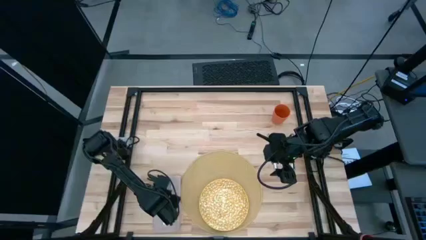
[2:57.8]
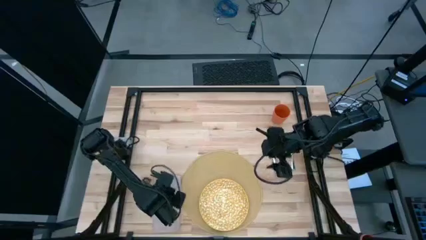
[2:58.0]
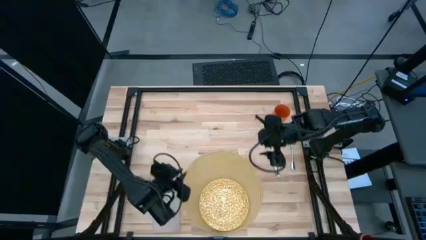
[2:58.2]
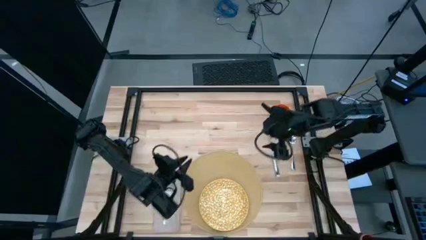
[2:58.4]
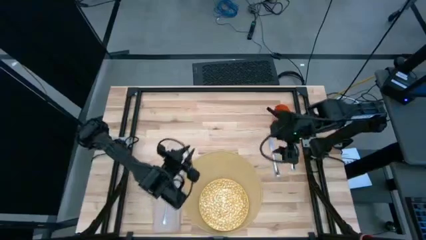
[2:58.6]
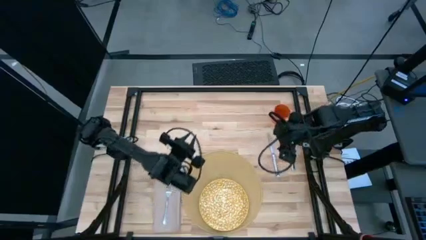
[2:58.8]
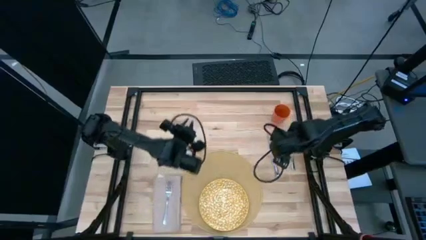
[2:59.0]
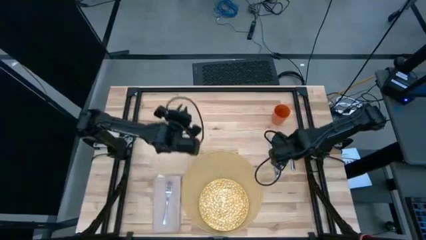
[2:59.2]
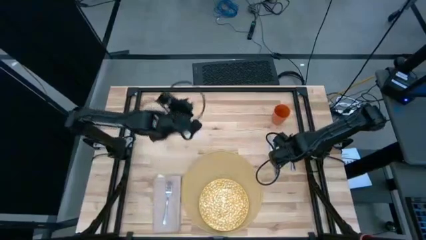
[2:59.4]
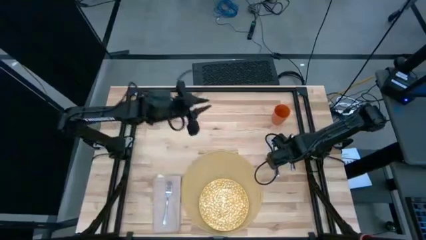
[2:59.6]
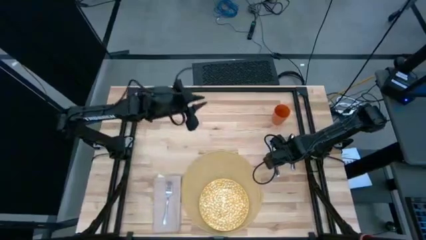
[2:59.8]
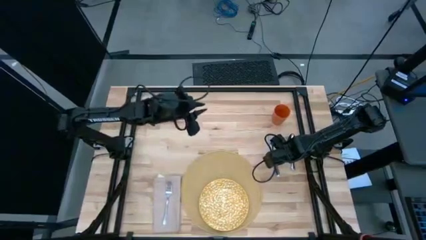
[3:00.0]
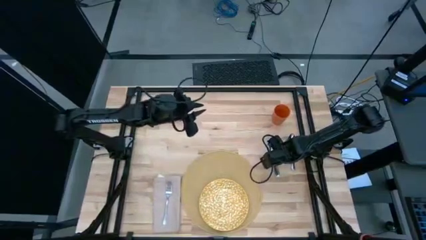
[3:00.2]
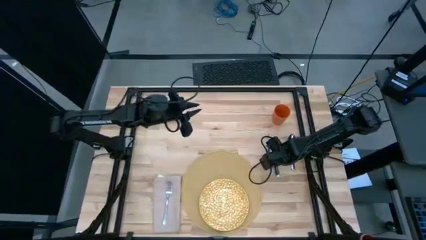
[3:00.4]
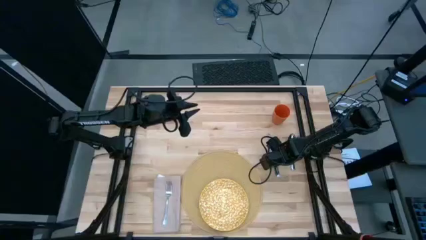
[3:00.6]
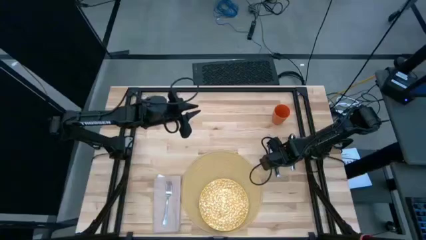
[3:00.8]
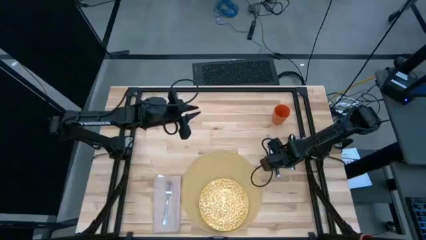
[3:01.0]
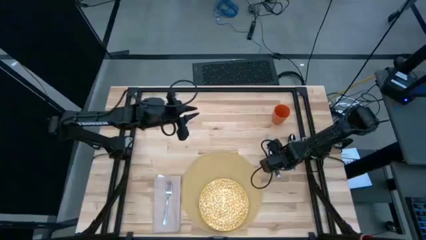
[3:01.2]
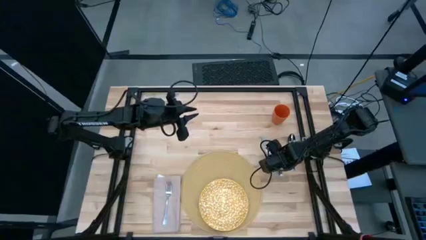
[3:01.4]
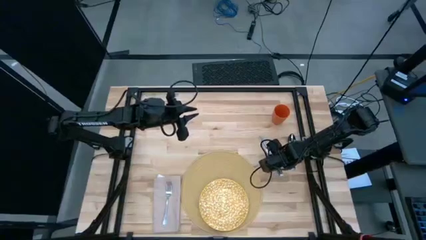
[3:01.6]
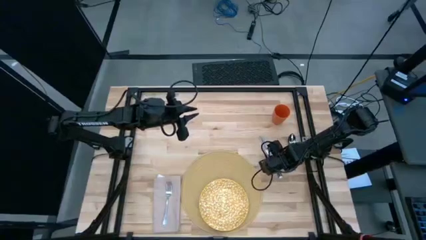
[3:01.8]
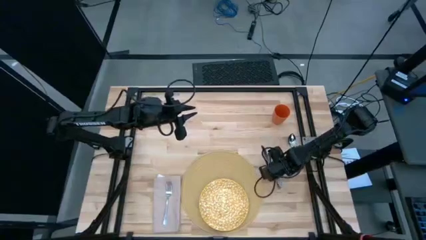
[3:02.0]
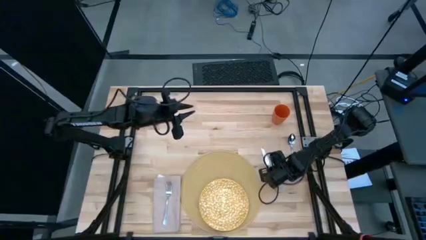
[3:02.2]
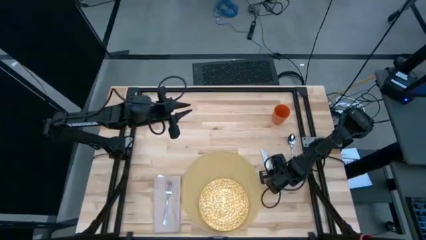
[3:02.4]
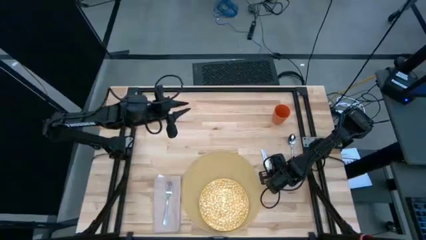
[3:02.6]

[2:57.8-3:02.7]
Task: Set table place
Put the table knife to the right of the brown table mat

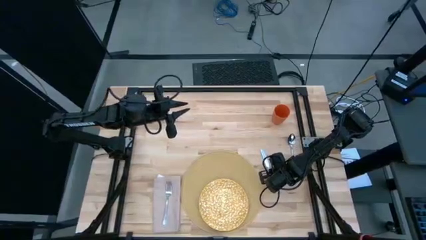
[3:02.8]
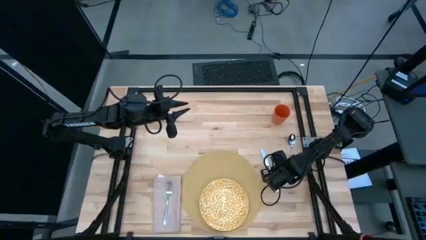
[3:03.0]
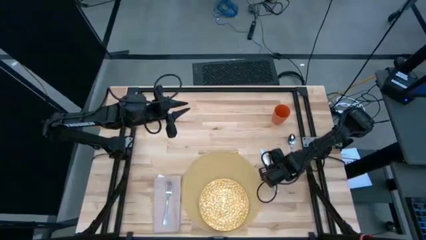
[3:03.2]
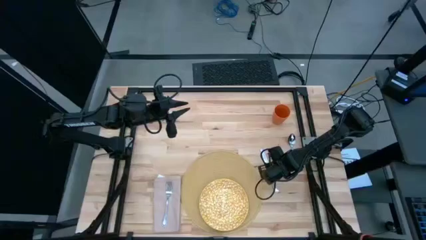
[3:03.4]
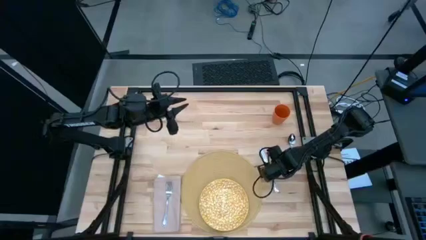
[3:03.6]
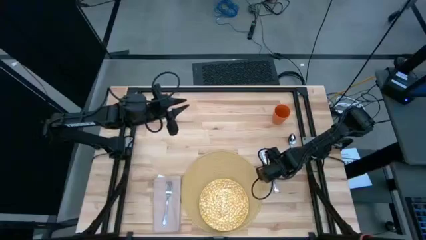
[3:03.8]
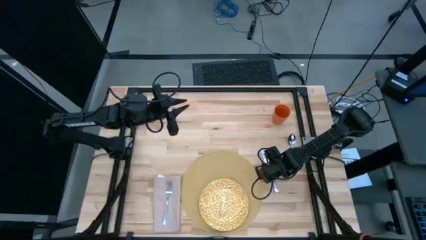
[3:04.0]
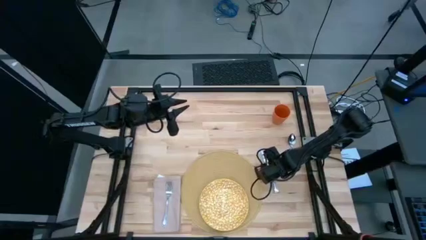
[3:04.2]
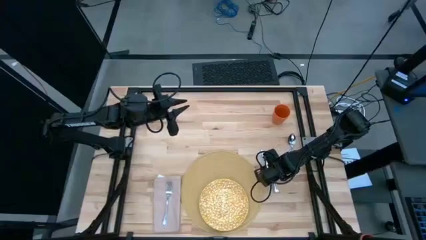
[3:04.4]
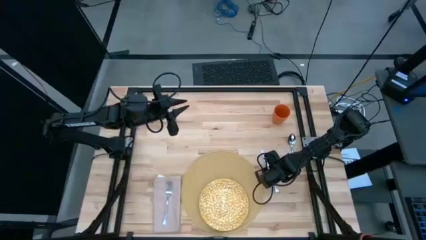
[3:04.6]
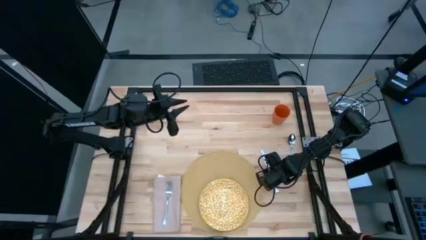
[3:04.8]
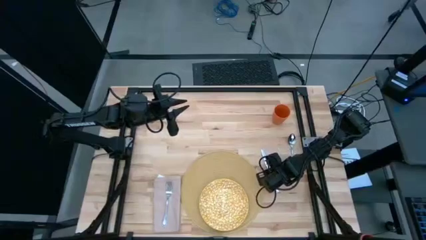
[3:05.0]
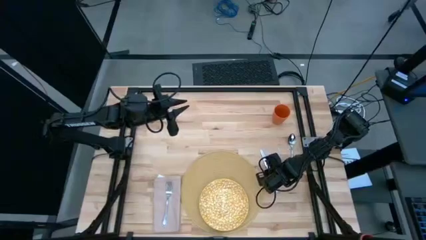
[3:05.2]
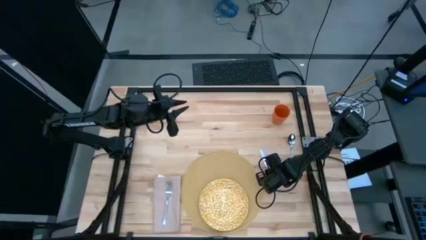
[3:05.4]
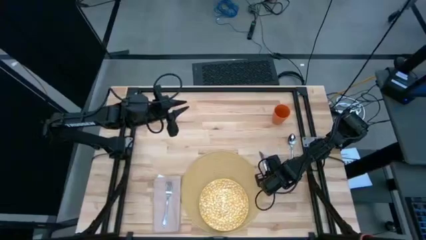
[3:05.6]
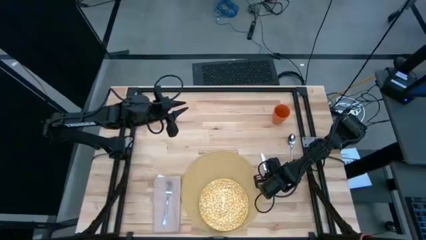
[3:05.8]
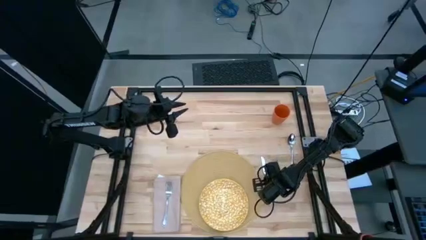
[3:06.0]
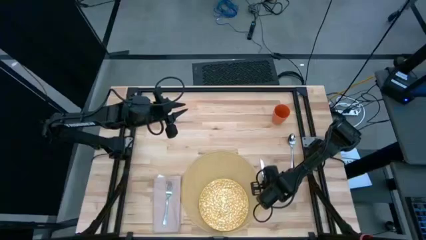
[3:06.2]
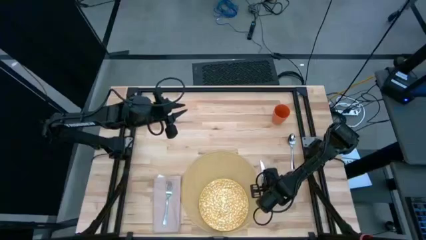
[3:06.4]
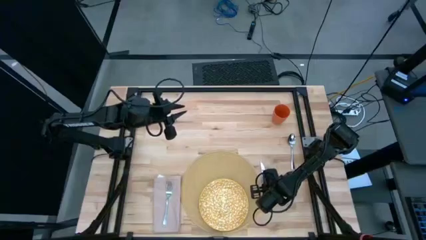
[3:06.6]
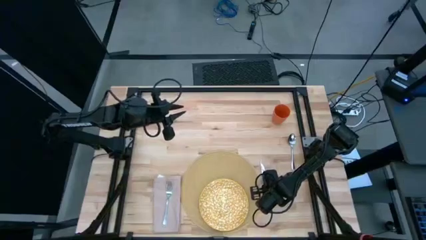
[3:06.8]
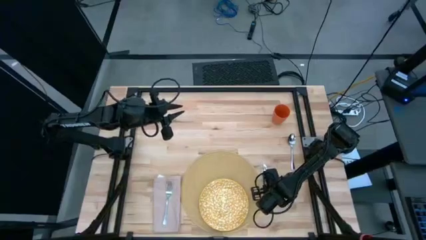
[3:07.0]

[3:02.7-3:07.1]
Put the table knife to the right of the brown table mat

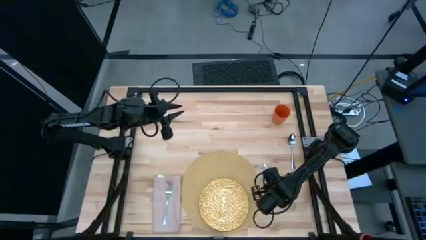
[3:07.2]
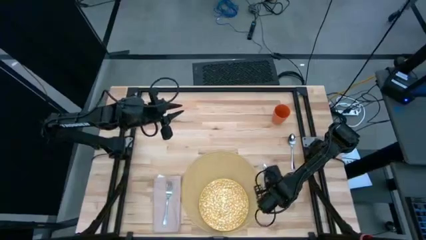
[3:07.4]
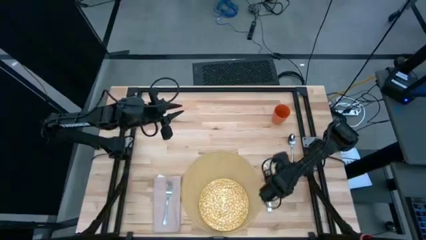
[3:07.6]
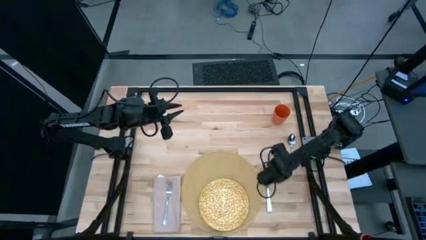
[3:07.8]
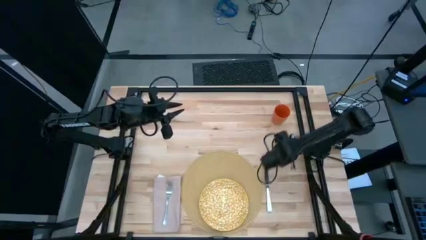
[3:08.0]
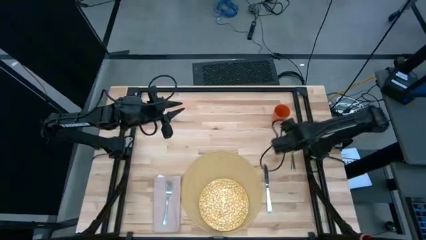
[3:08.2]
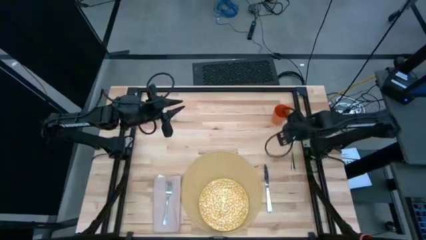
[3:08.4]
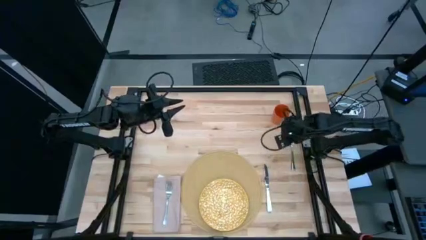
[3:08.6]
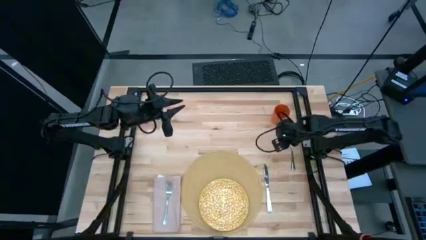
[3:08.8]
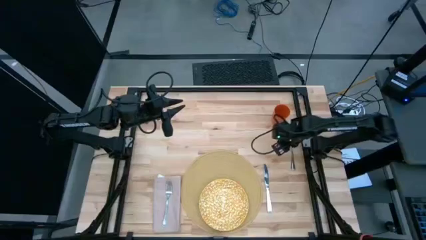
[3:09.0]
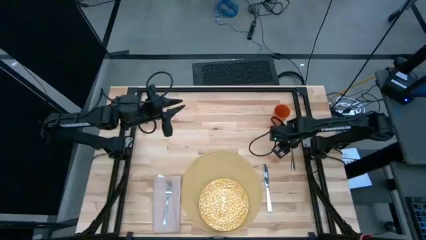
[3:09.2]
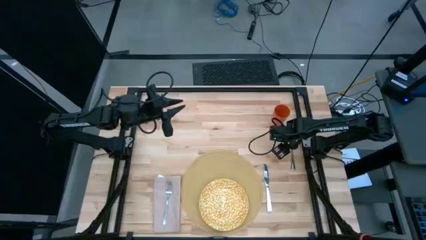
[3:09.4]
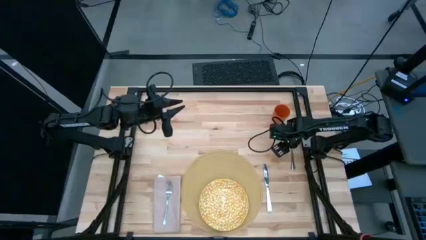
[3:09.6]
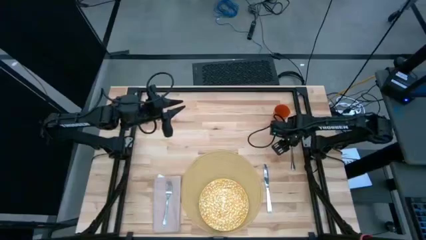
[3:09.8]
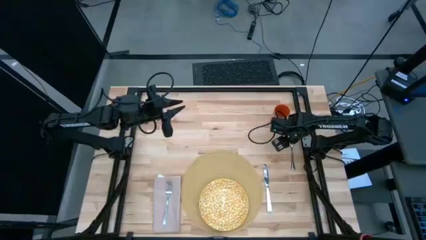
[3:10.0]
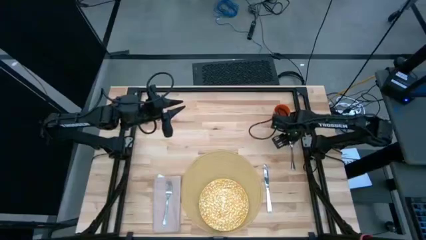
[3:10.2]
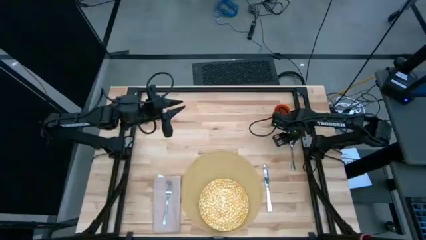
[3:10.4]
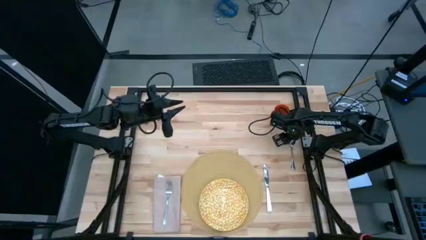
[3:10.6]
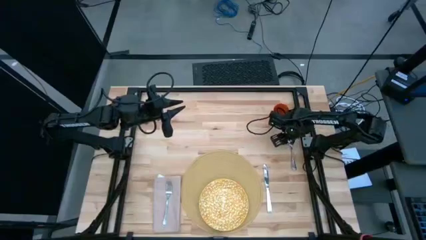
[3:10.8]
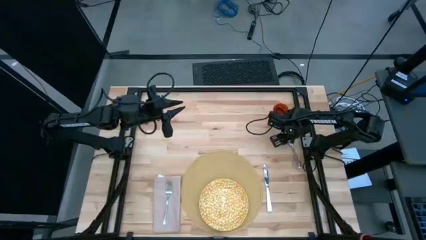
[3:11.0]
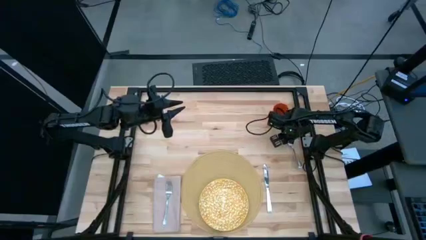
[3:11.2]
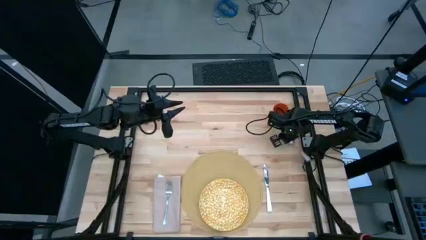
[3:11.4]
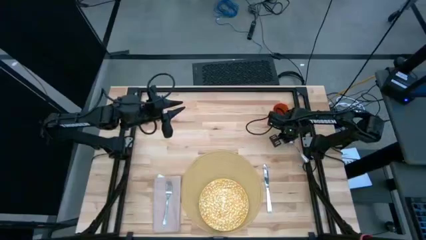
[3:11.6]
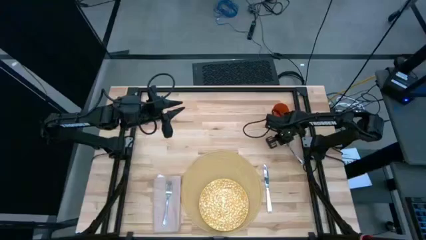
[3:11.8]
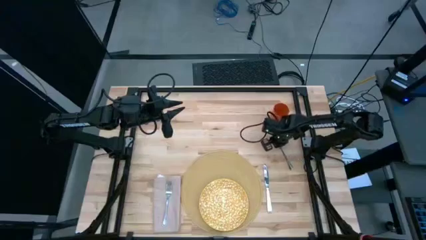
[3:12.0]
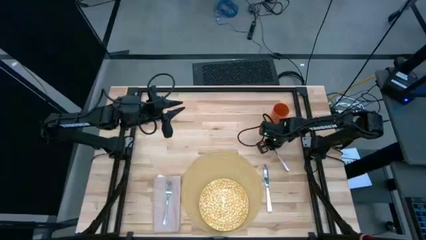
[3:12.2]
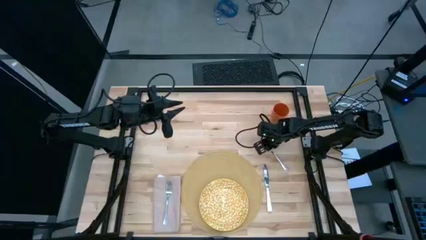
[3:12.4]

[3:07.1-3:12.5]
Put the spoon on the right of the table knife

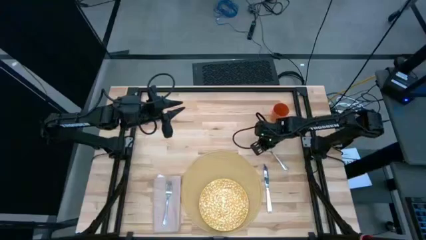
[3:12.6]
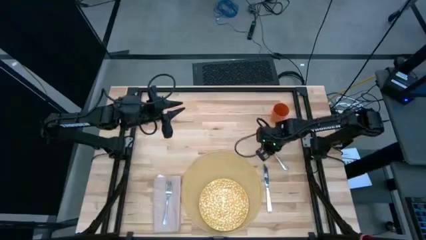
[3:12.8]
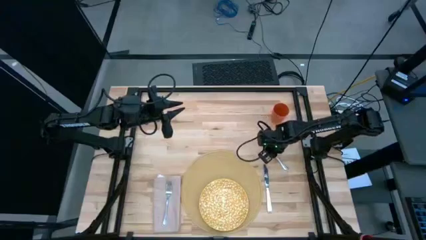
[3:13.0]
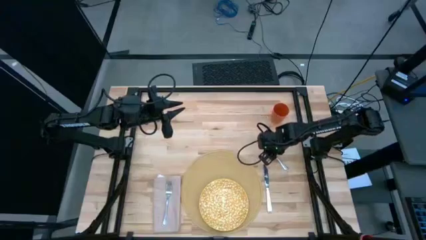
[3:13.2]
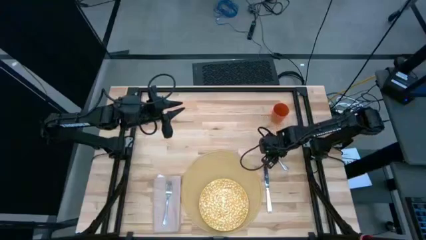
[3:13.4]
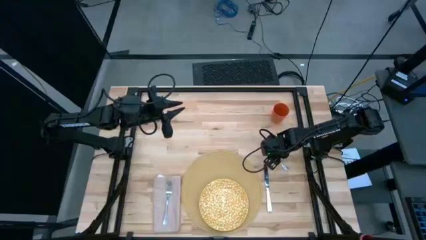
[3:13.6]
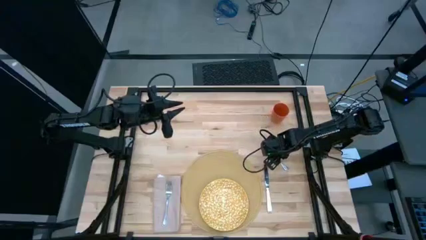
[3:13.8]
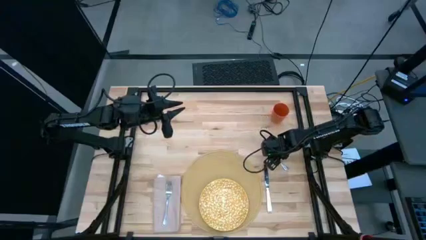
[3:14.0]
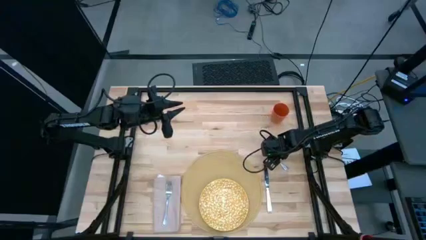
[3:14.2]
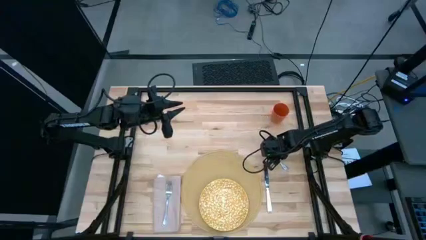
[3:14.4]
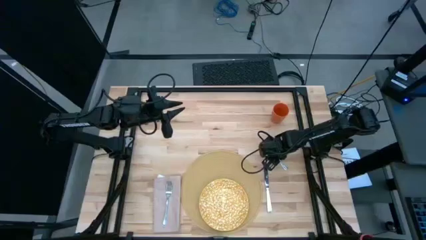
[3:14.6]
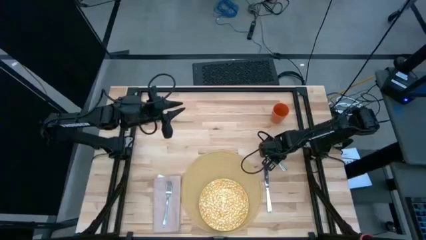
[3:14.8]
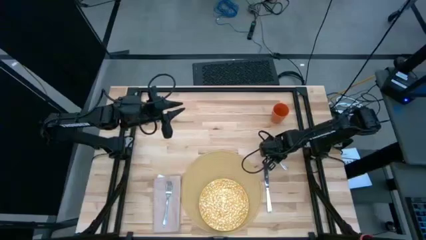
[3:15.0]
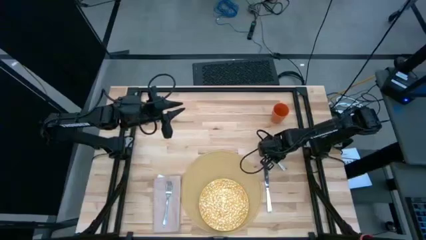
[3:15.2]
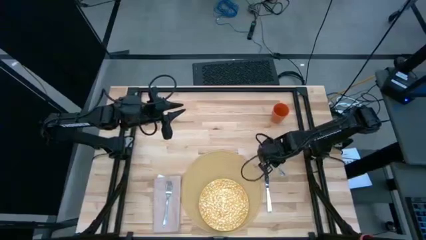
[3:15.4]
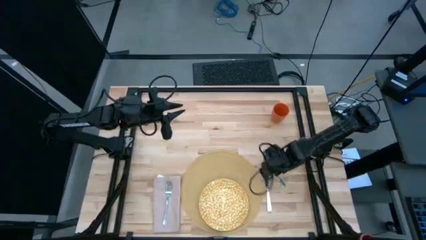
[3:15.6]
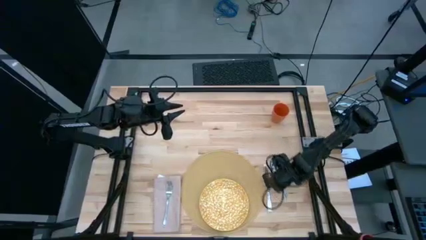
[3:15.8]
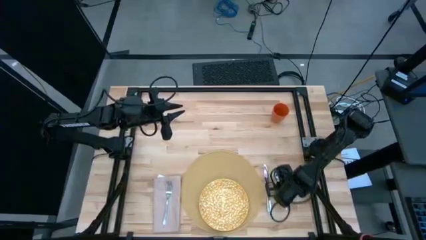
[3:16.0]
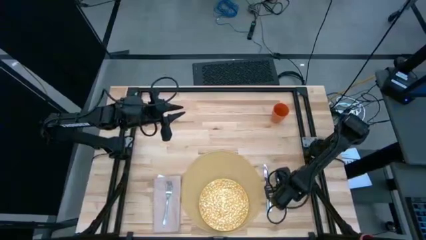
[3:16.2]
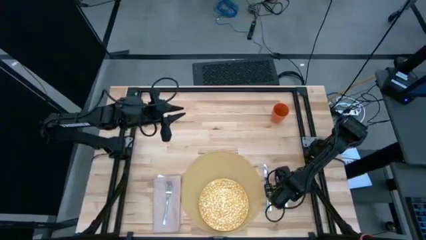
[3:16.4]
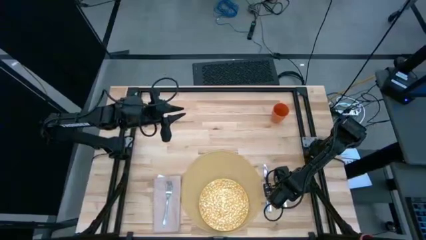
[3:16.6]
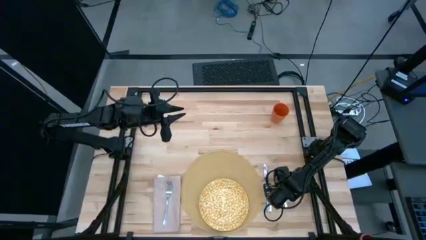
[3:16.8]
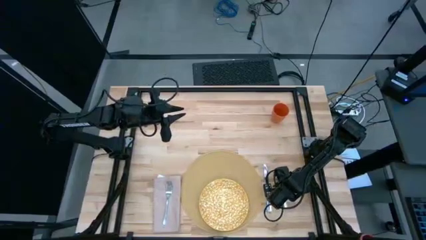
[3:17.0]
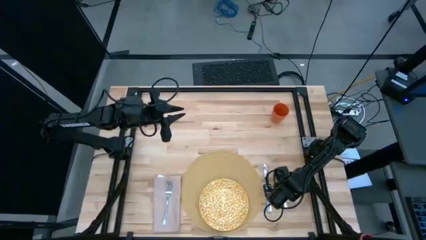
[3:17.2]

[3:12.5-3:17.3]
Put the spoon on the right of the table knife
